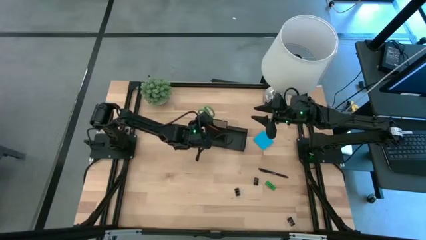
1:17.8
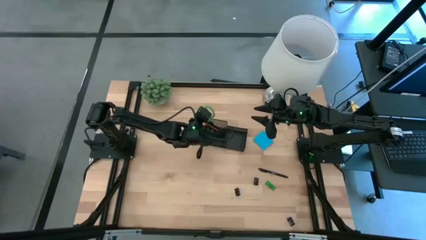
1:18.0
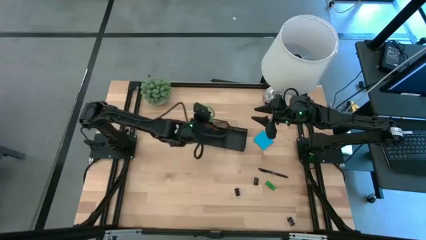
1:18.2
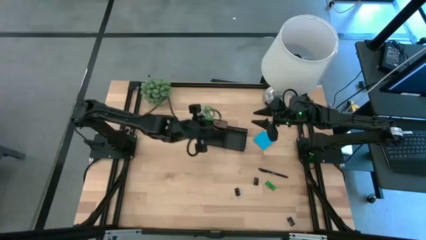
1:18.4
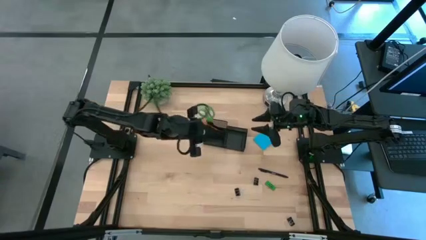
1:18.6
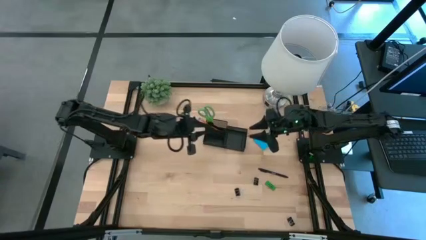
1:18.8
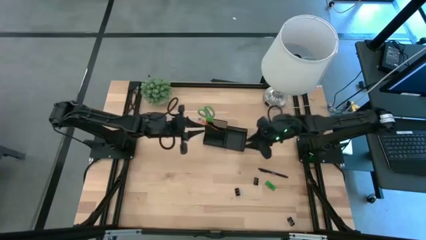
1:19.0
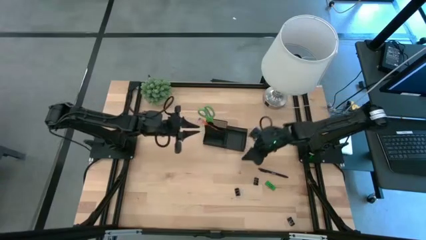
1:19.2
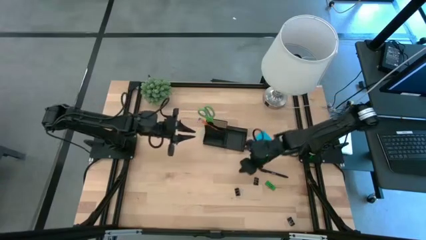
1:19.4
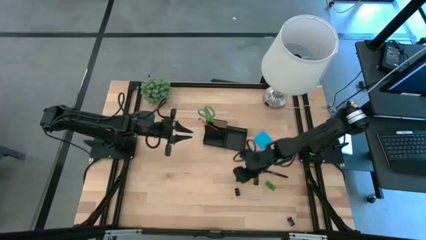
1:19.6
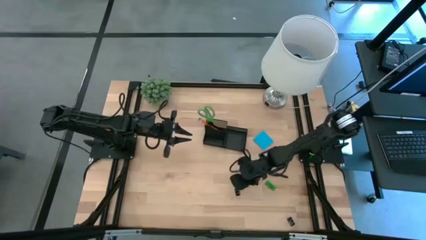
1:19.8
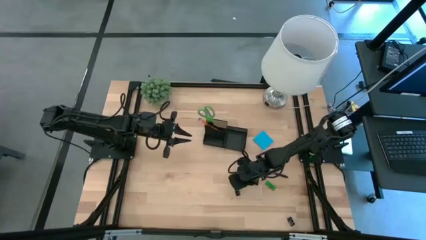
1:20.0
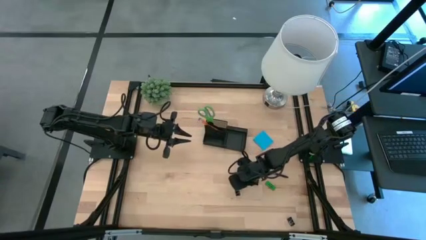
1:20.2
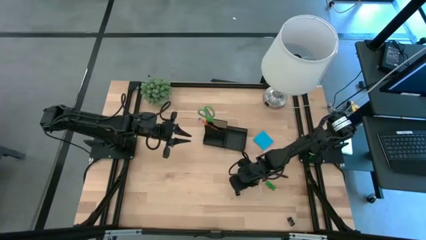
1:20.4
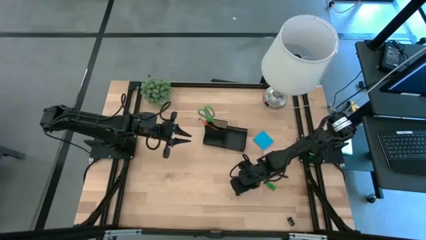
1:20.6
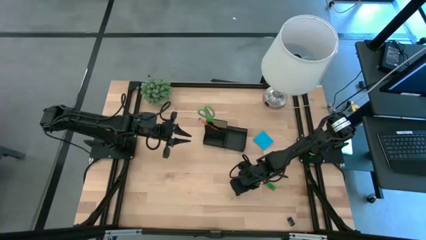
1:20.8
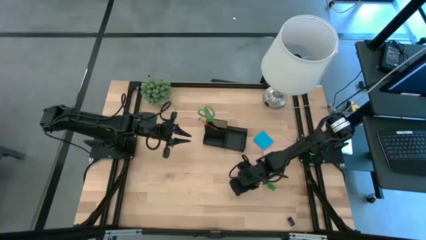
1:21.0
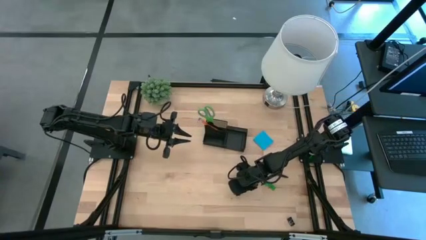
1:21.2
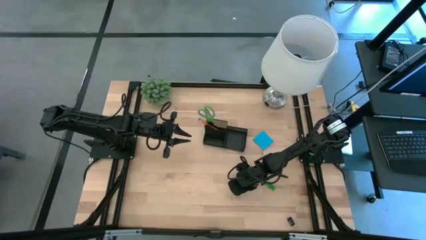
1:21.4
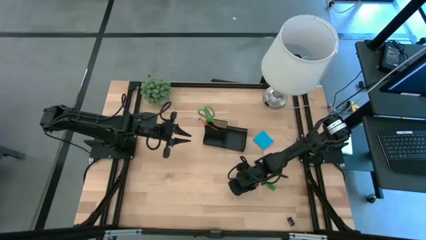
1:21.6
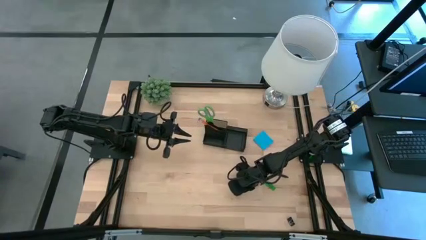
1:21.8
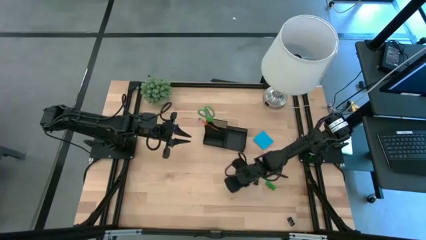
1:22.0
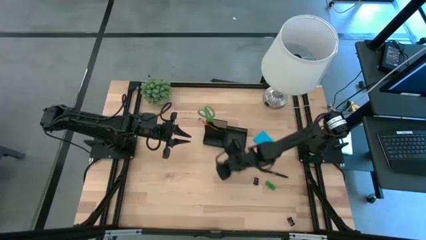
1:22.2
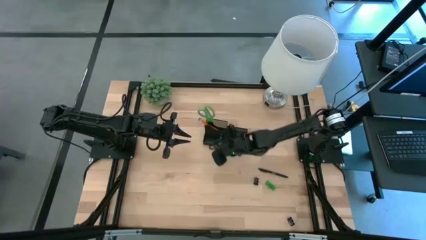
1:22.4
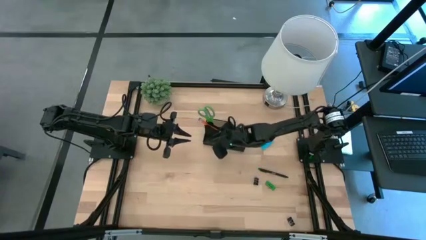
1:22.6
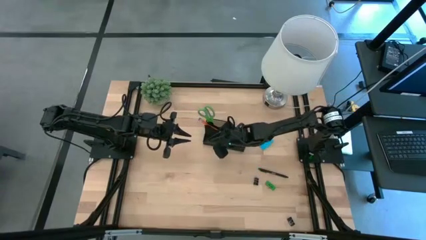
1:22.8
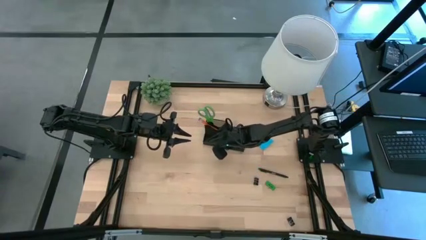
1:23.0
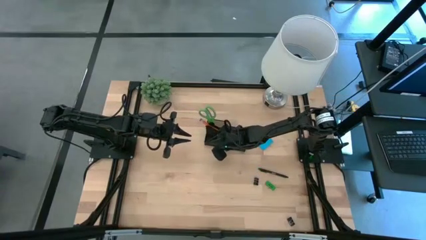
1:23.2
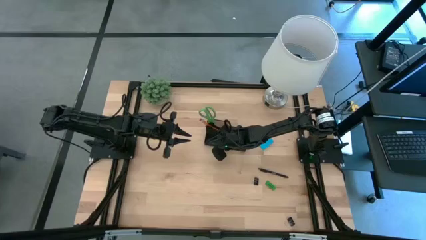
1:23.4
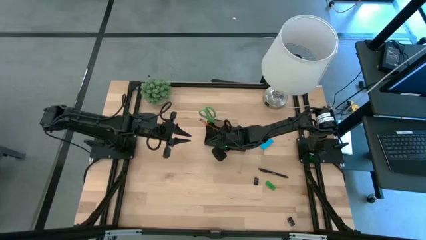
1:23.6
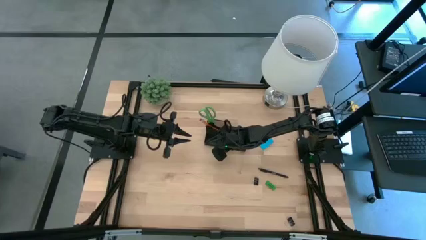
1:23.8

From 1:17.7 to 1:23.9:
Task: Pick and place office supplies into organizer
Put the middle left black binder clip into the black organizer

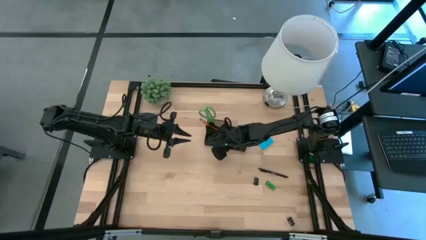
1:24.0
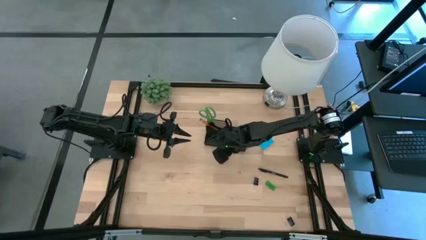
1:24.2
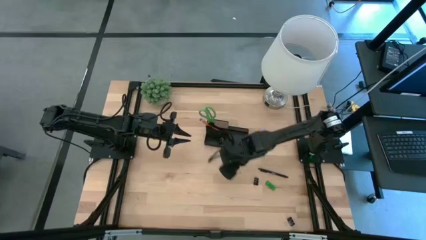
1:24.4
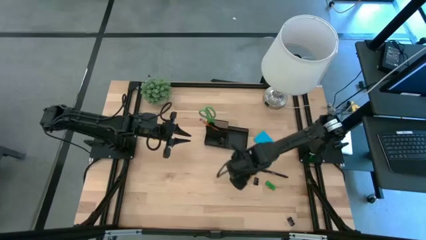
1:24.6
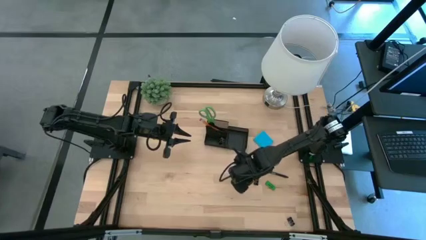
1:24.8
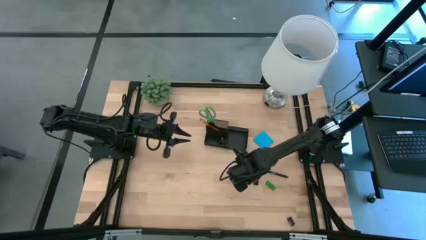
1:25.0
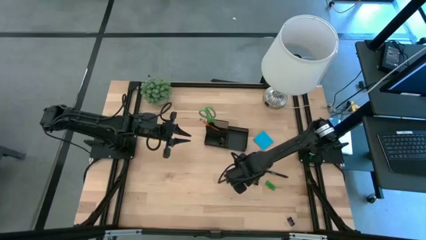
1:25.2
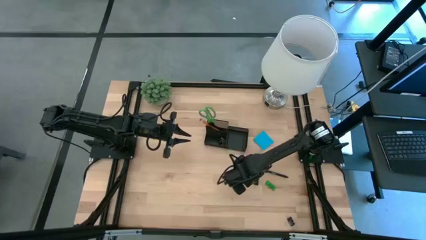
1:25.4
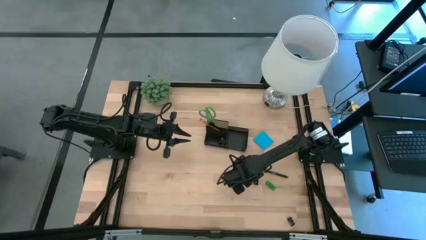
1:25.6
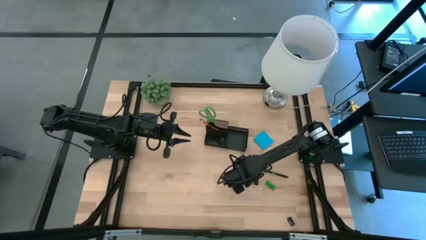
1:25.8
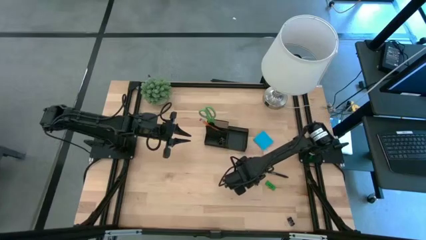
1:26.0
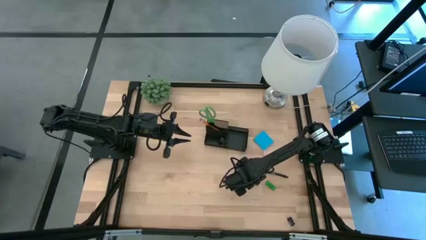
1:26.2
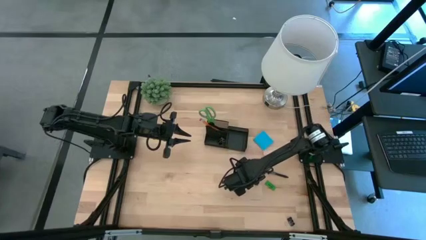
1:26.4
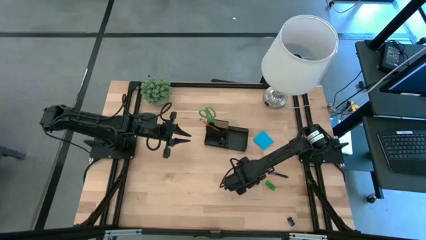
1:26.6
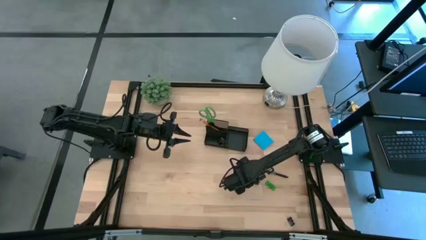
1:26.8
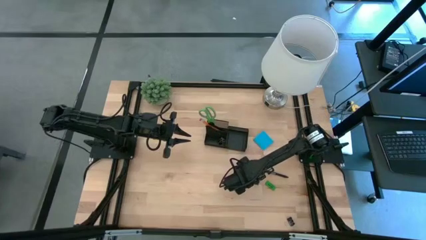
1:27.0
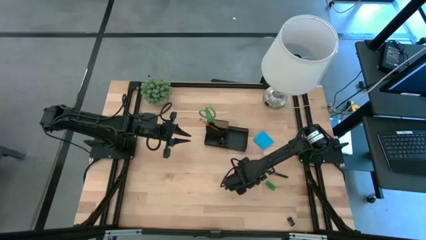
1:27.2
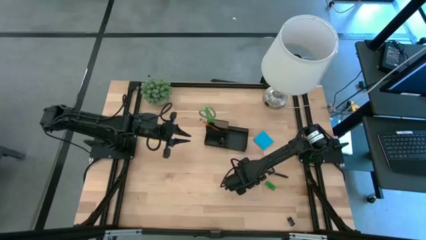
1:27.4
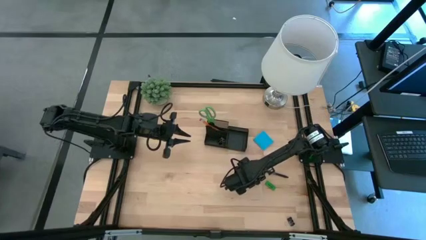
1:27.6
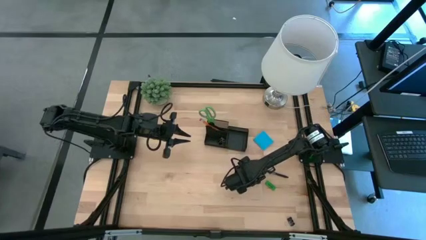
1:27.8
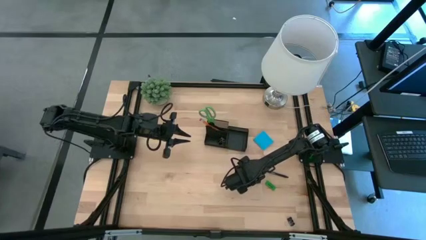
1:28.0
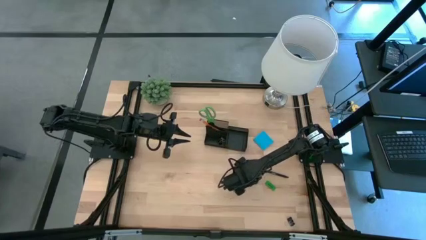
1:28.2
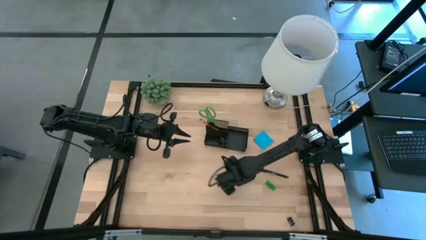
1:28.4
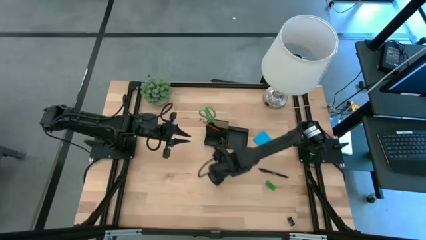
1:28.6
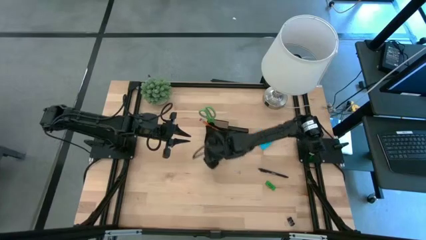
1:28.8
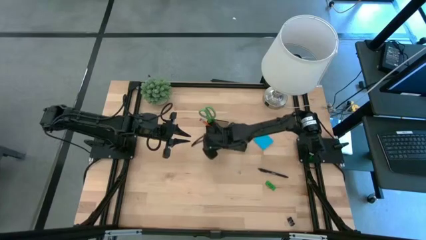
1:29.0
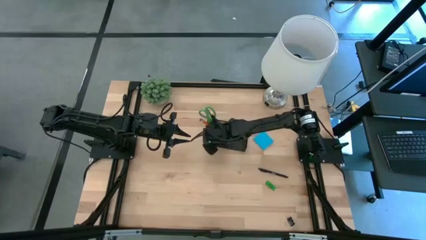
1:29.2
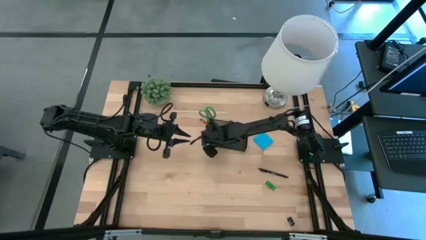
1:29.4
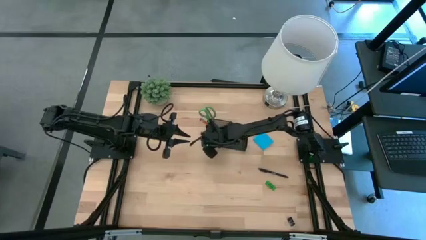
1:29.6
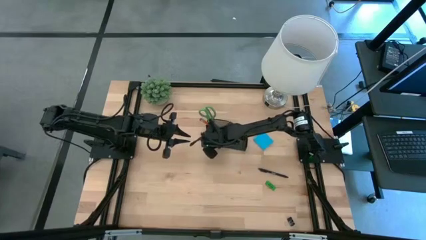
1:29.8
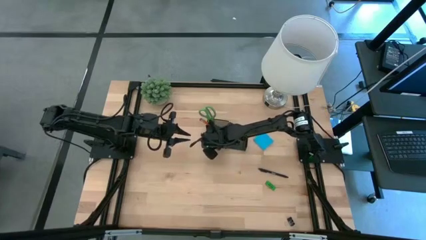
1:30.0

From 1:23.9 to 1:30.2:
Put the top black binder clip into the black organizer

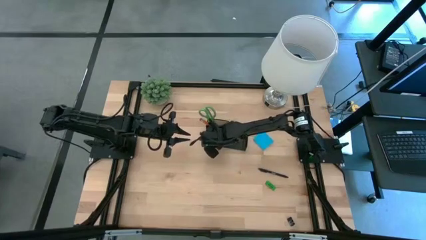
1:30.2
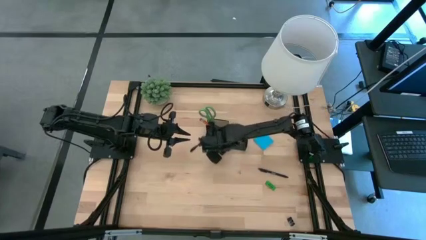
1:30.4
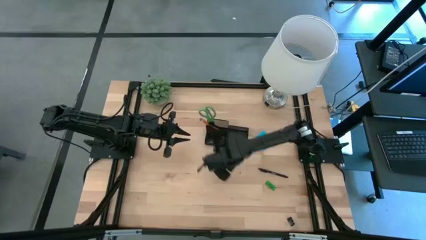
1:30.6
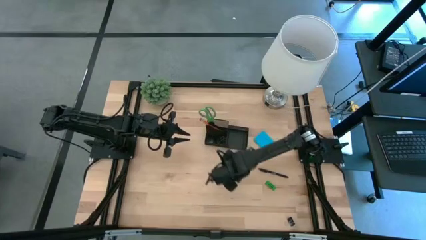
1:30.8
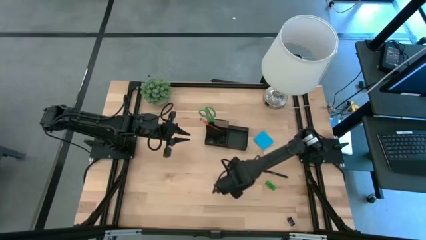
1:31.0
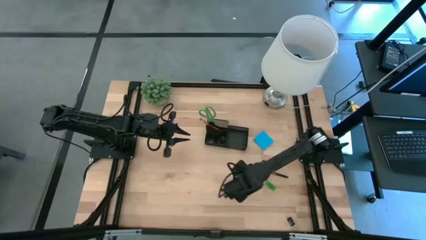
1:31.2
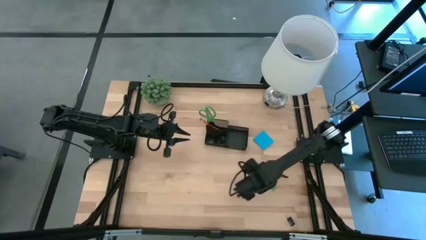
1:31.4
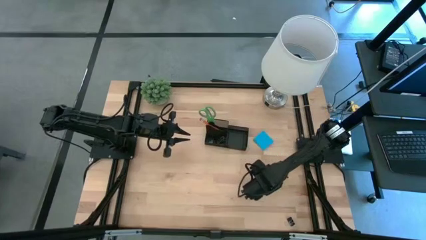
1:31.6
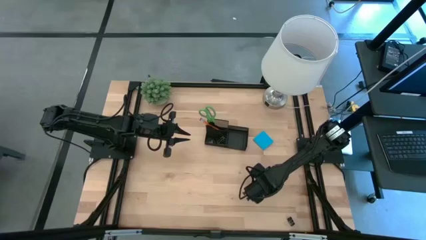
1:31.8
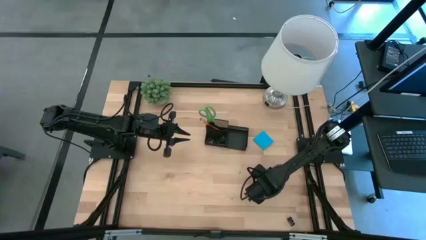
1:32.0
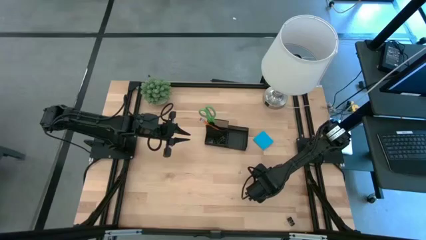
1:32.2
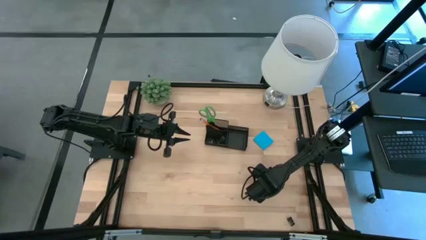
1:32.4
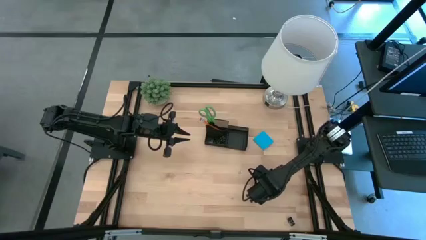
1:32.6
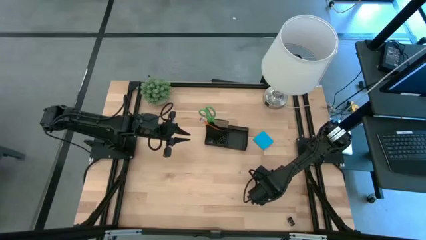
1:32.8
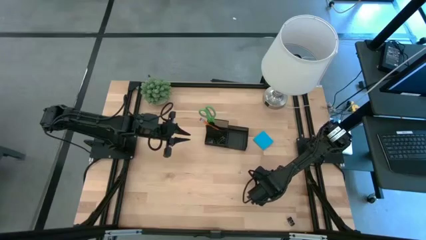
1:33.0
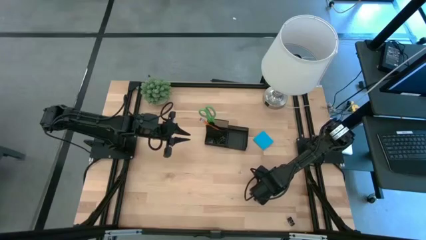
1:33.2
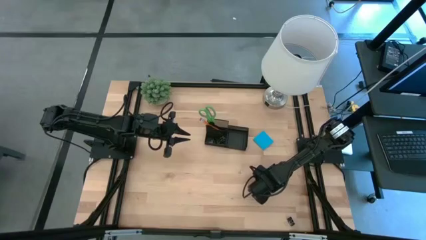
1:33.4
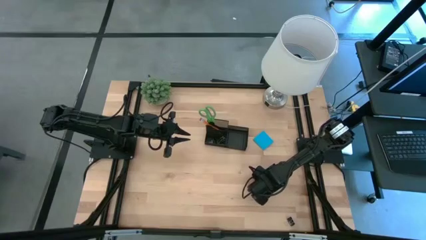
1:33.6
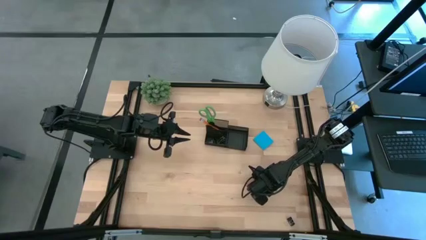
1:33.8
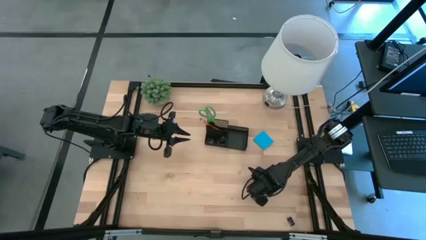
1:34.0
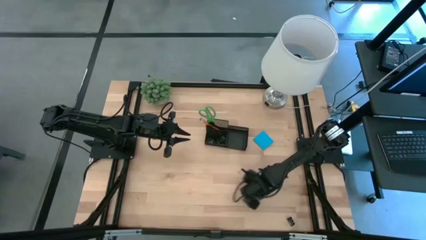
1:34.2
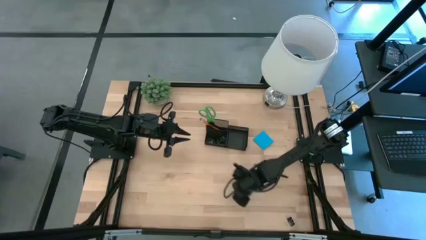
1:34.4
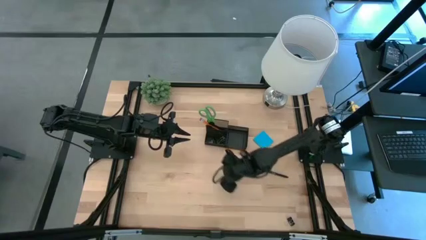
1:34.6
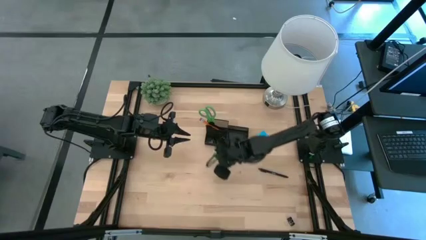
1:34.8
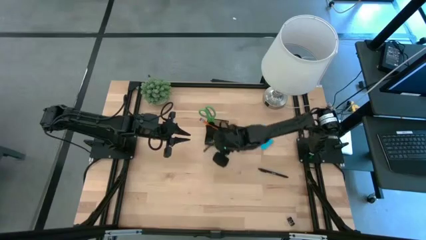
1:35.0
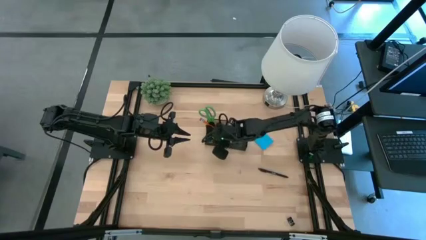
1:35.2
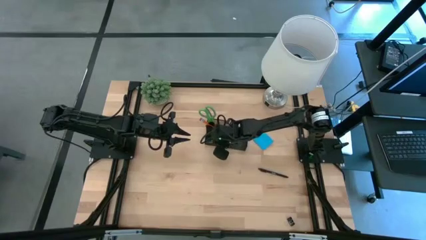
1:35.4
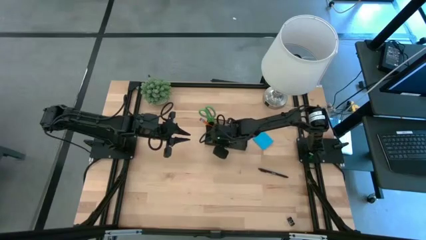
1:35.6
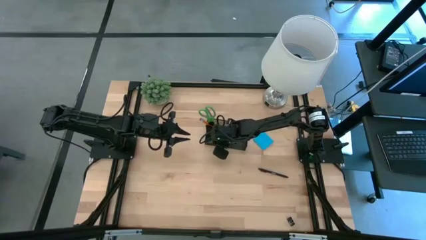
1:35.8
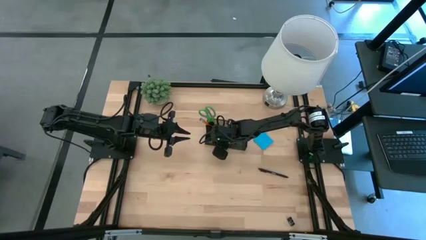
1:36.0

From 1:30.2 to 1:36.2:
Put the green eraser into the black organizer
